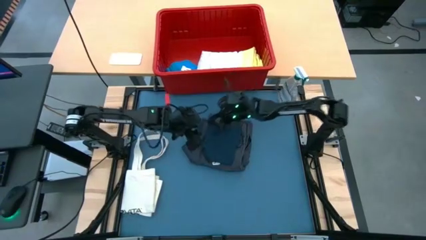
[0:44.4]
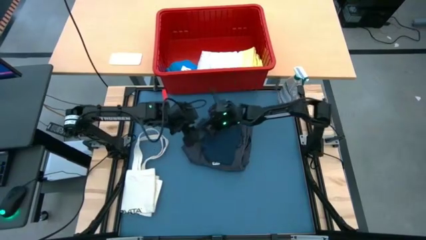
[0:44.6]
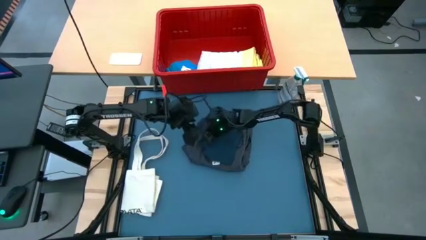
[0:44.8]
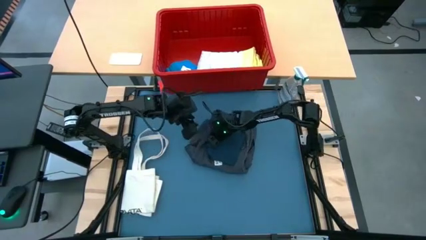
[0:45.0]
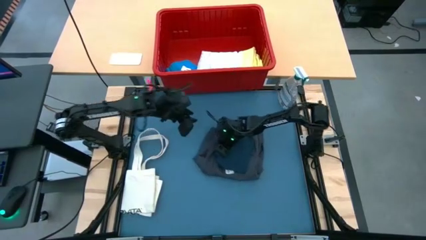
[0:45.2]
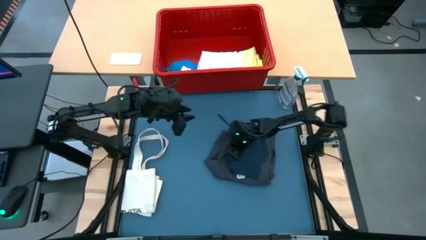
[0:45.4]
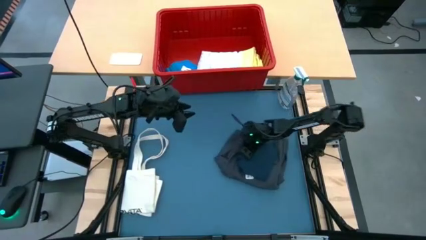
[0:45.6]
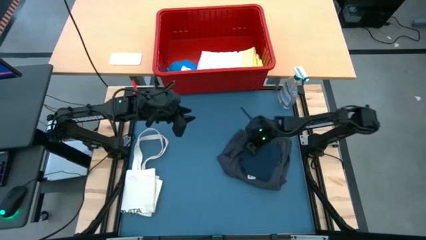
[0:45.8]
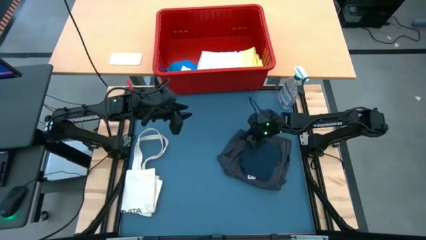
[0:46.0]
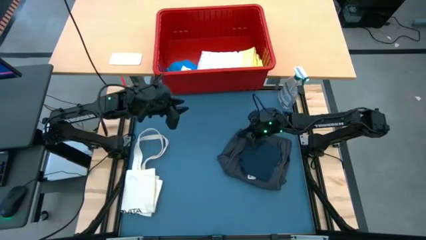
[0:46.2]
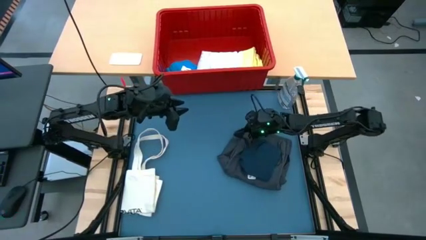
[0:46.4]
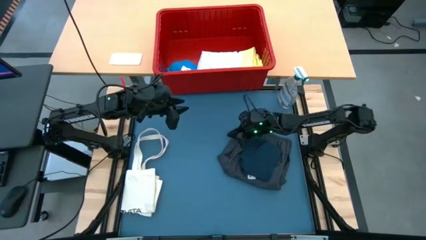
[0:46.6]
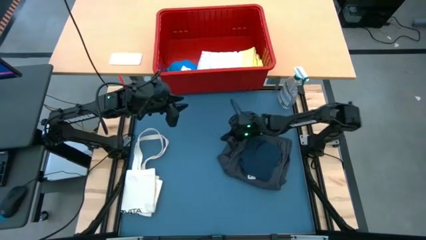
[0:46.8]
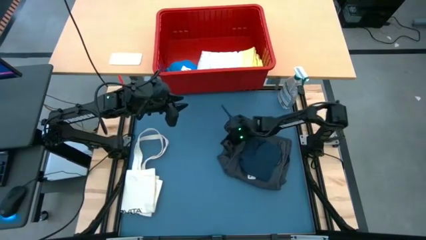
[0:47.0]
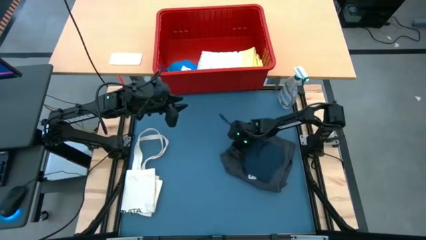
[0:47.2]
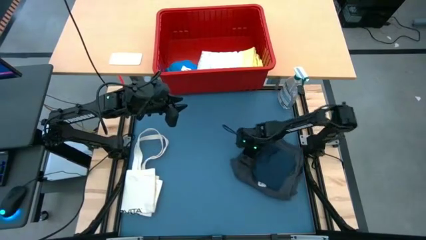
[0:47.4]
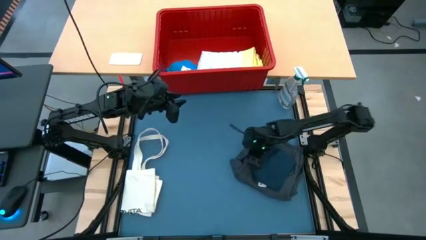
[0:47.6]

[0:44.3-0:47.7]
Task: Fold Laundry from Bin
Move the folded clothes to the right of the table

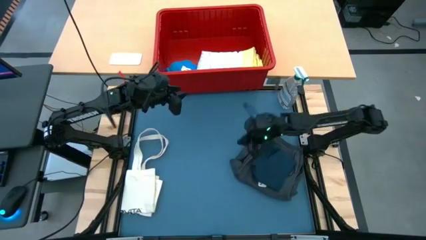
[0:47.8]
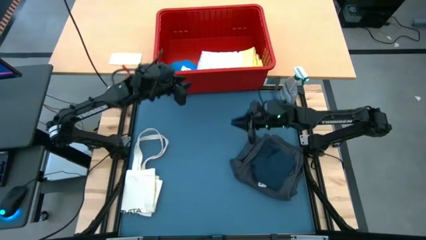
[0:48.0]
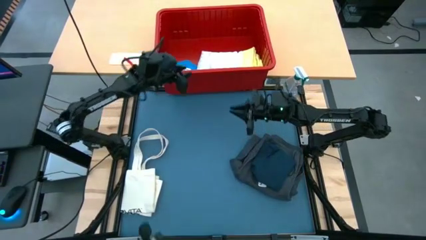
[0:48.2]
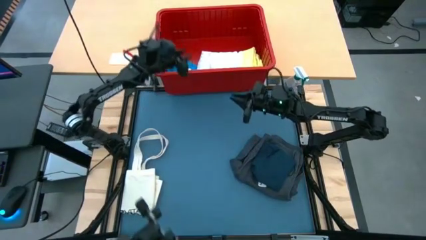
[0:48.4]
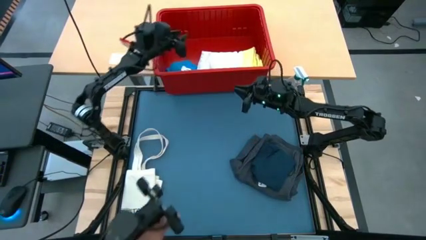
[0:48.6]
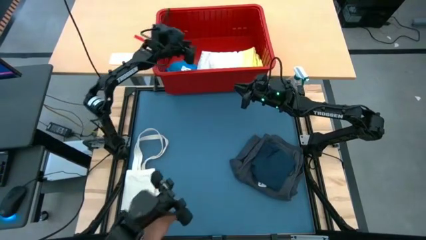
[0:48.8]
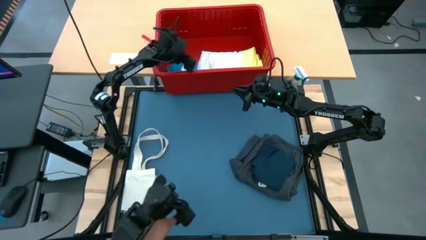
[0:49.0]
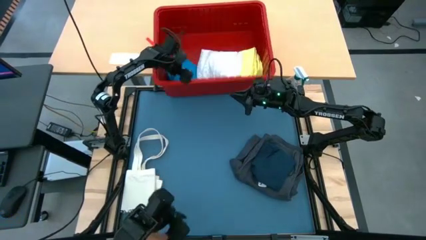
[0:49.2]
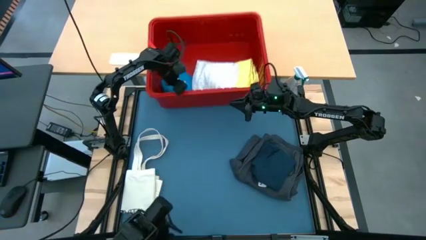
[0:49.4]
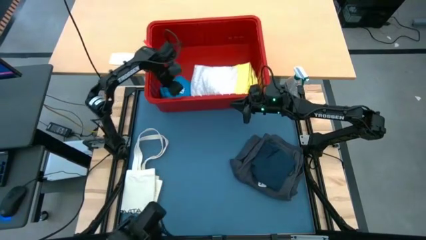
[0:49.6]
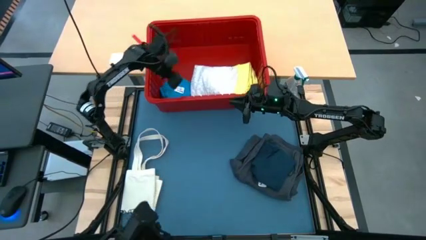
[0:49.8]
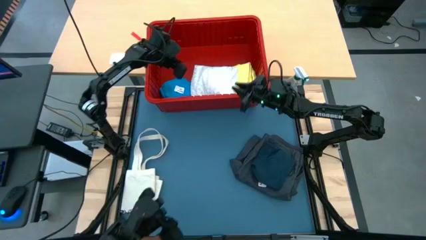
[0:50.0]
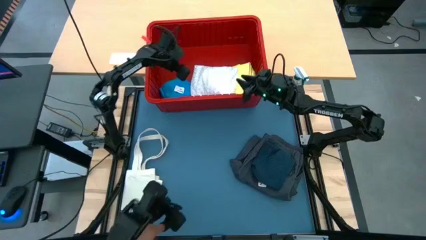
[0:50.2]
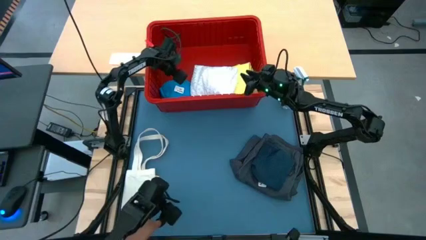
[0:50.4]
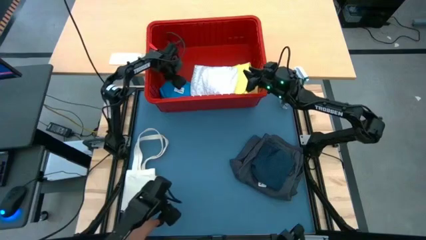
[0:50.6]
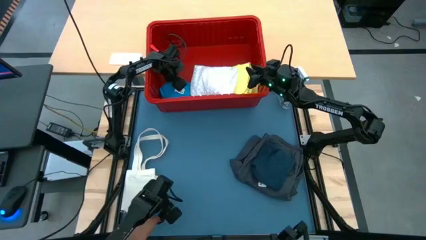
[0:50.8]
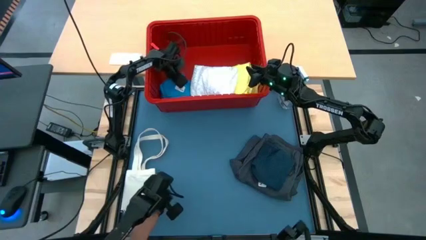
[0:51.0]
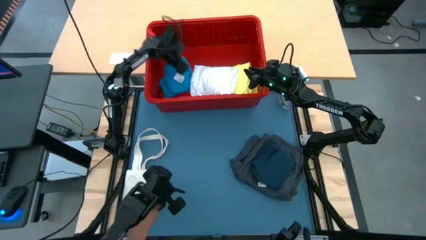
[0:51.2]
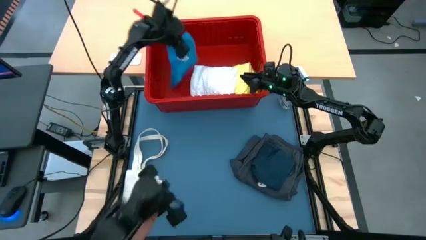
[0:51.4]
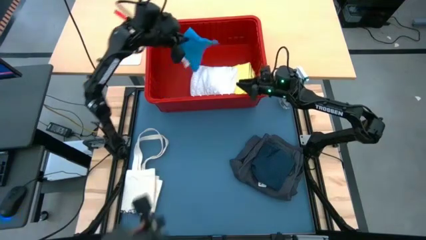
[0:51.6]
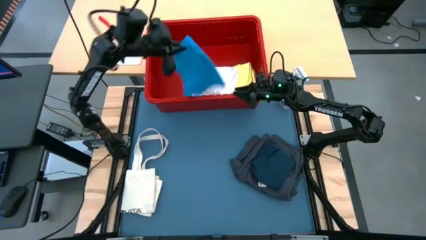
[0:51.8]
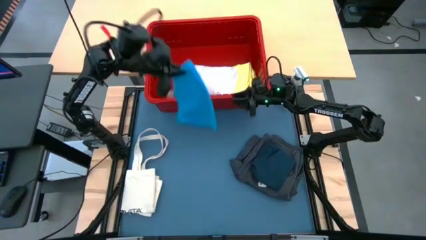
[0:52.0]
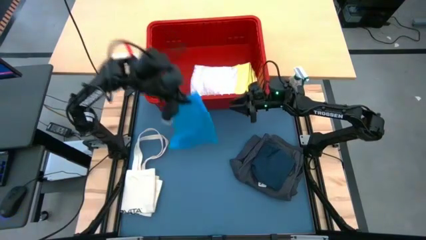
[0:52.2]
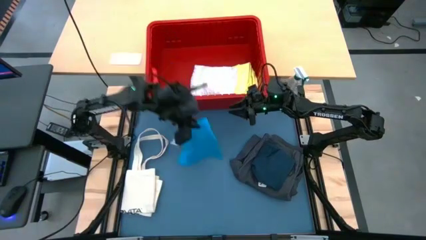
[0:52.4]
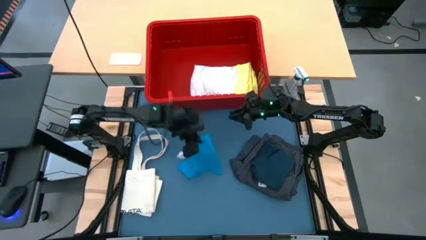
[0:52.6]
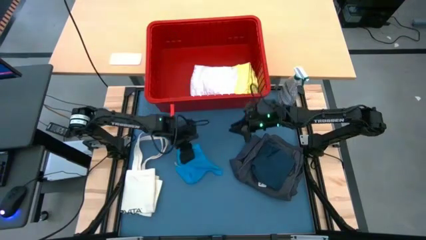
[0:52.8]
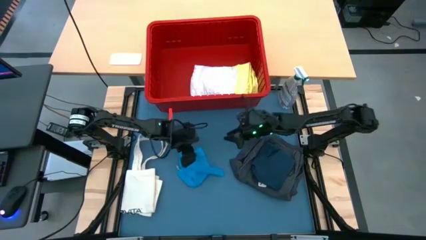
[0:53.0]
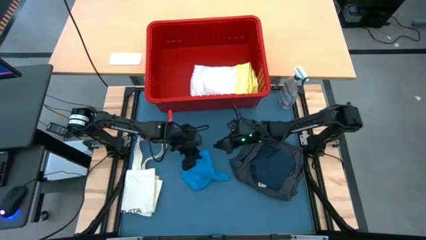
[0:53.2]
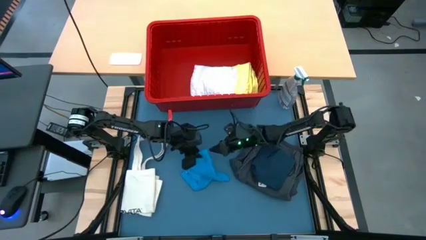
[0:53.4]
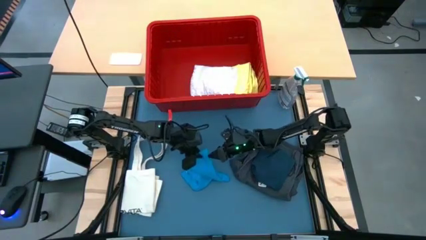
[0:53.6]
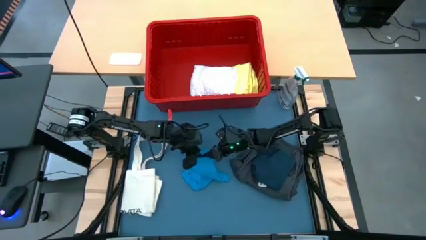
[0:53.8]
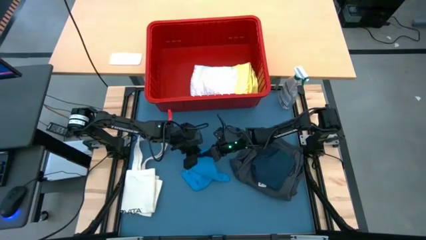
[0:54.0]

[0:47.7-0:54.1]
Remove the blue shorts from the bin
